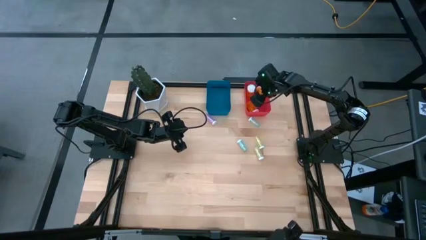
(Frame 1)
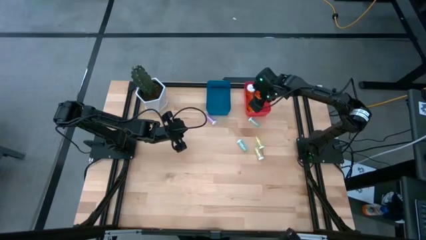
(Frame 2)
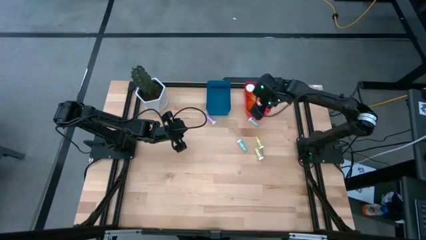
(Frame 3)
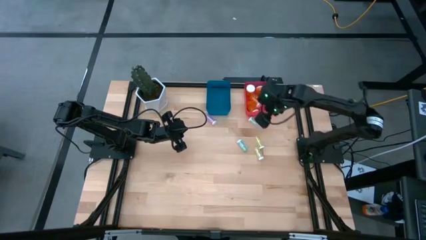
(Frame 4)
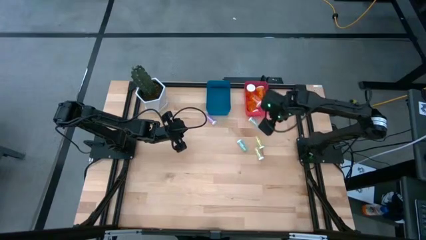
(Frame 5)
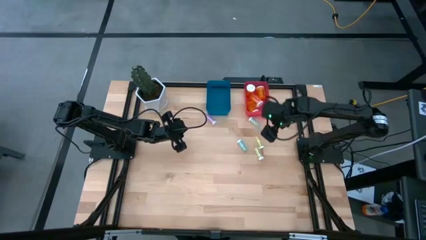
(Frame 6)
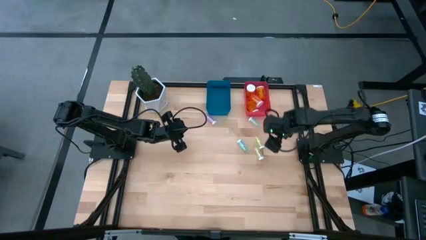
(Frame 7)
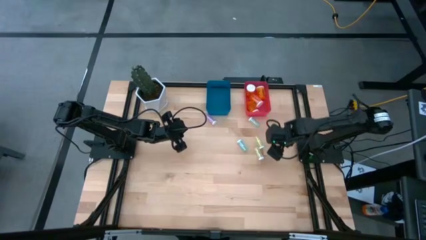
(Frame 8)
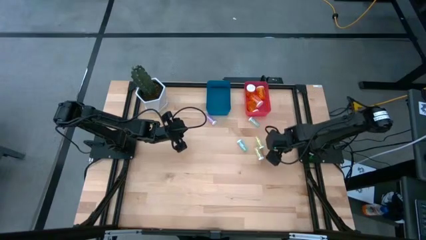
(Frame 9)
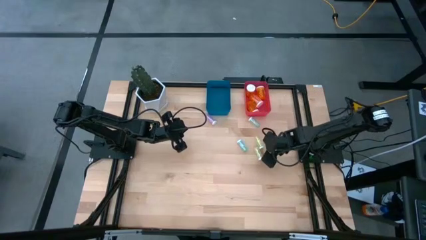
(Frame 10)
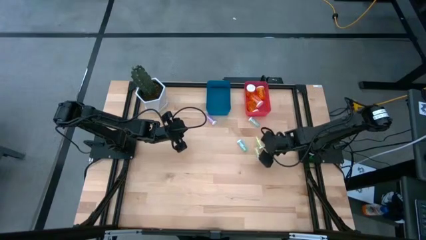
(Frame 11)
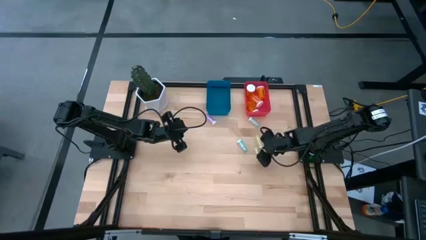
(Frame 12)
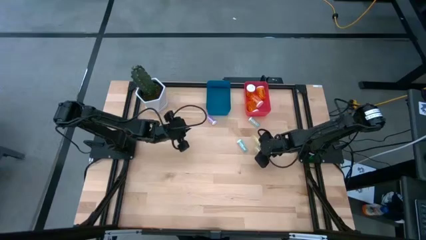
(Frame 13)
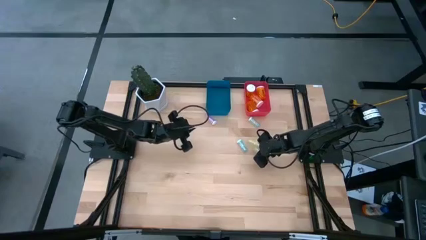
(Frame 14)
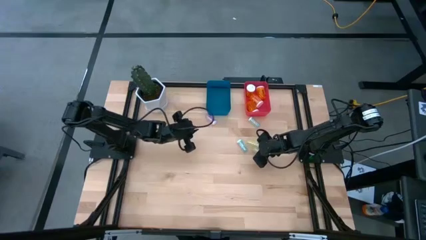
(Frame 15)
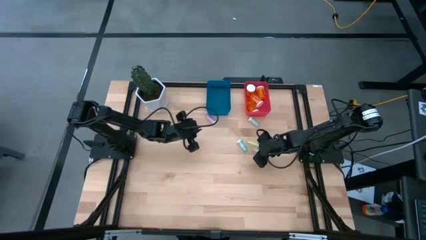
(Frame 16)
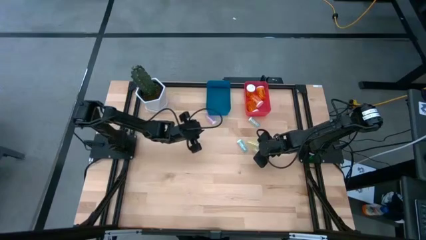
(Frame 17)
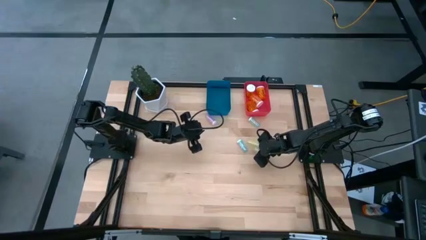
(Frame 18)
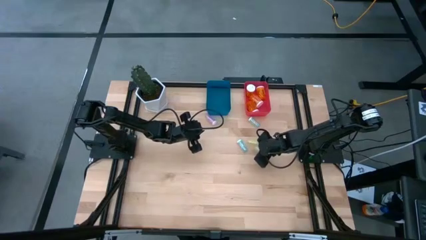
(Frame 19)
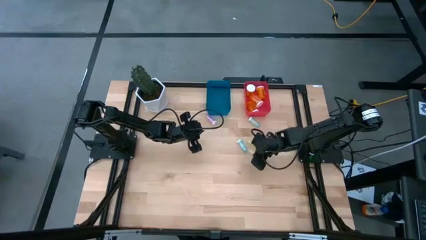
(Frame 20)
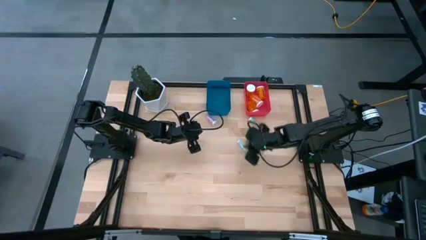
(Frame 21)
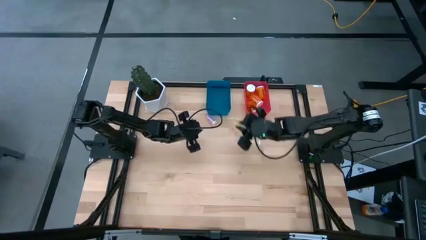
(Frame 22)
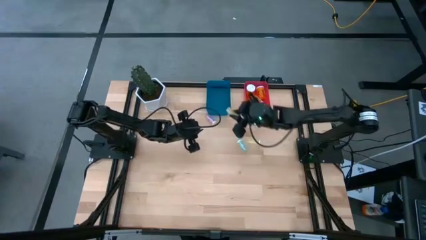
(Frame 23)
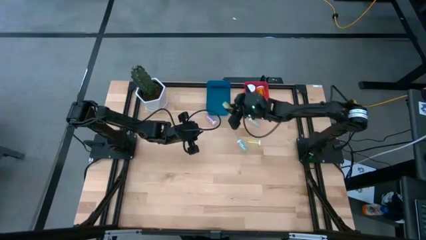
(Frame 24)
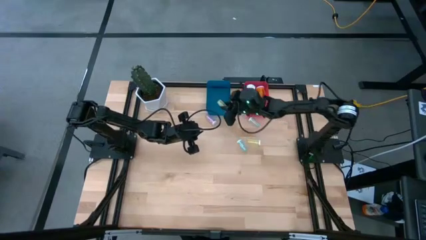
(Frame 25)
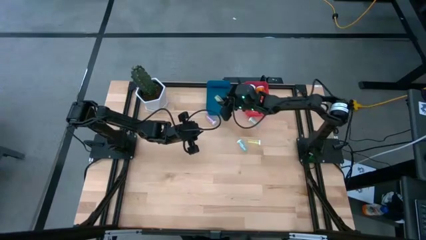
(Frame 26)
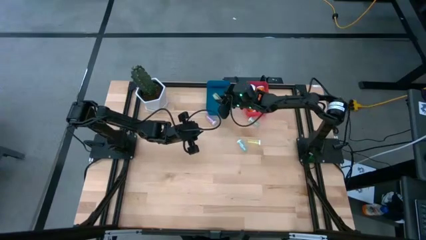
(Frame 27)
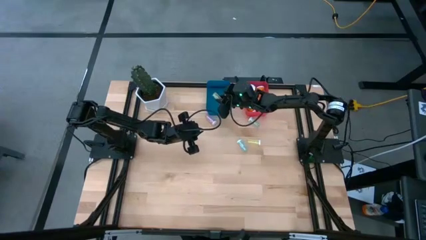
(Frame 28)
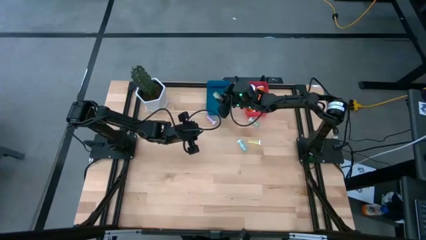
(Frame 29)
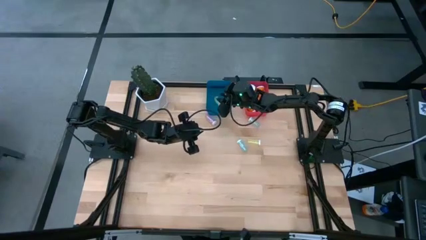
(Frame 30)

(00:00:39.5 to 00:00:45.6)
Task: Pick and place medicine bottles into bin by pill shape (circle, oval)
Put the bottom small yellow pill bottle into the blue bin

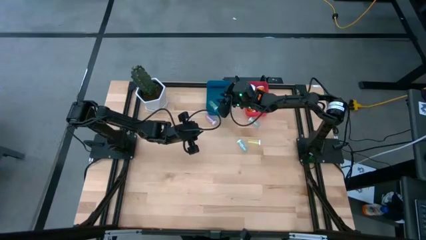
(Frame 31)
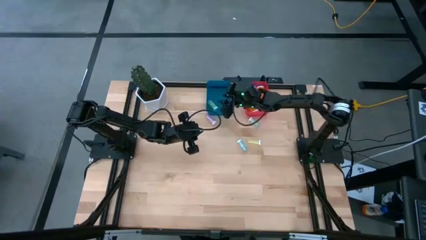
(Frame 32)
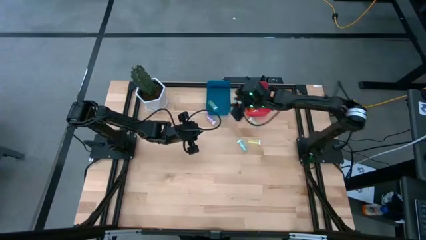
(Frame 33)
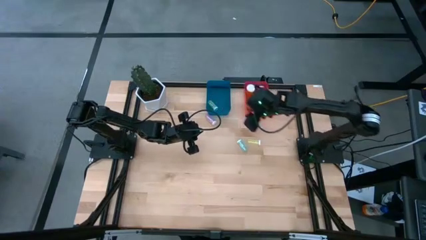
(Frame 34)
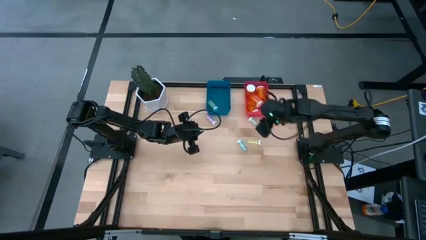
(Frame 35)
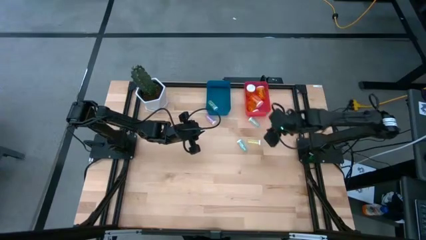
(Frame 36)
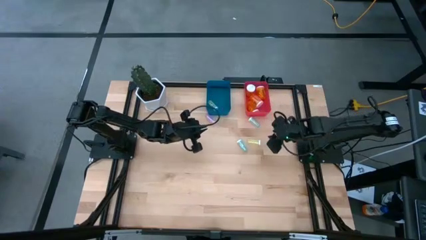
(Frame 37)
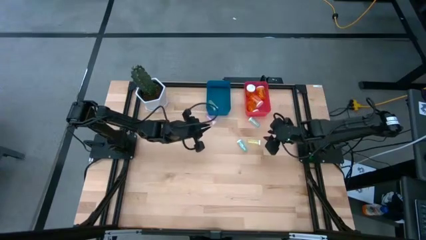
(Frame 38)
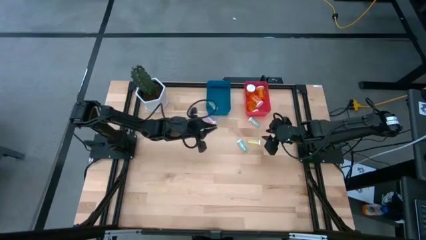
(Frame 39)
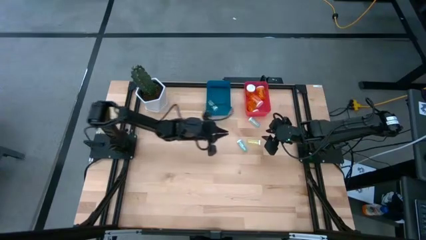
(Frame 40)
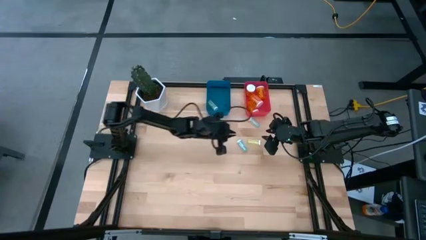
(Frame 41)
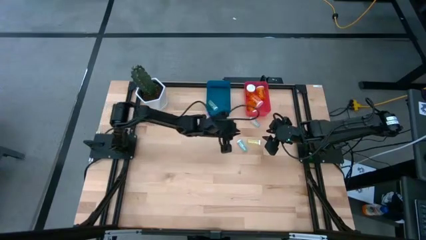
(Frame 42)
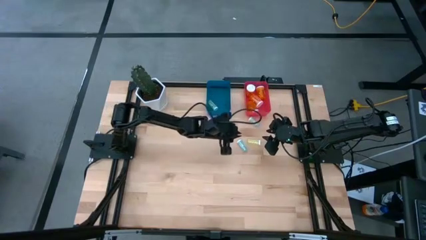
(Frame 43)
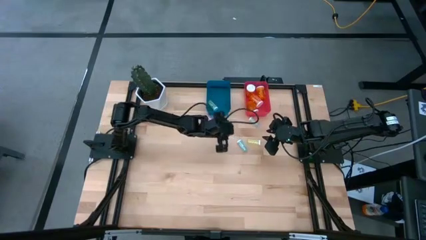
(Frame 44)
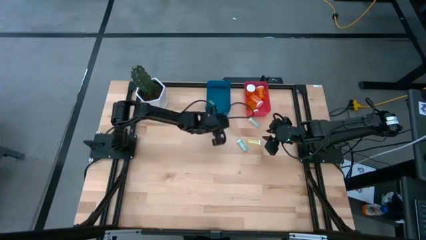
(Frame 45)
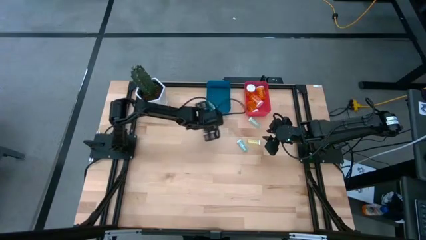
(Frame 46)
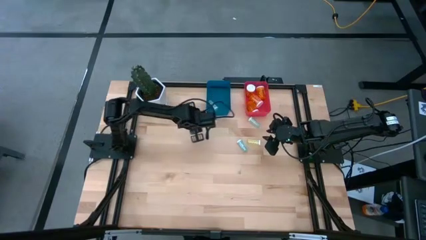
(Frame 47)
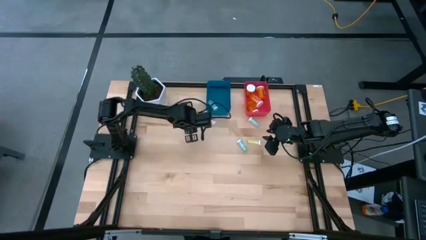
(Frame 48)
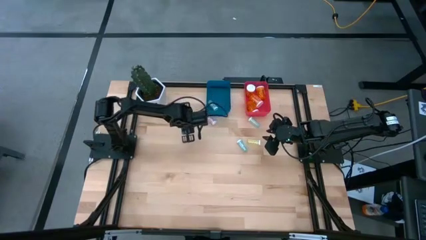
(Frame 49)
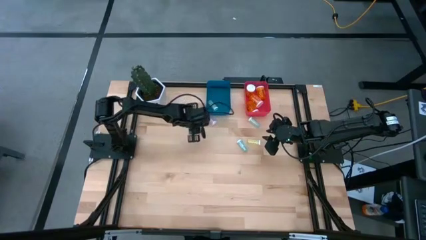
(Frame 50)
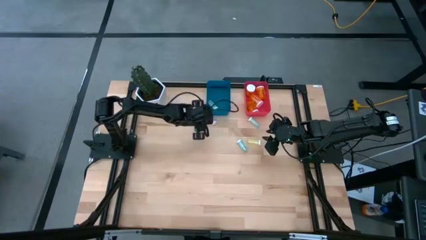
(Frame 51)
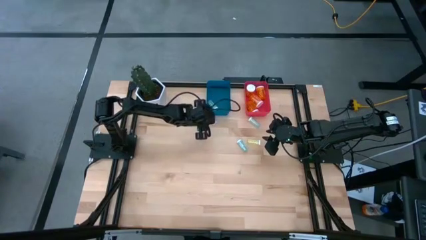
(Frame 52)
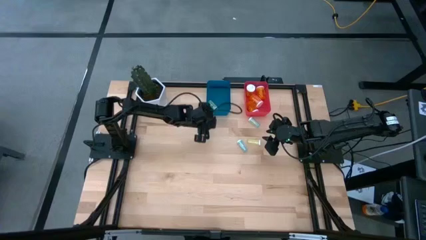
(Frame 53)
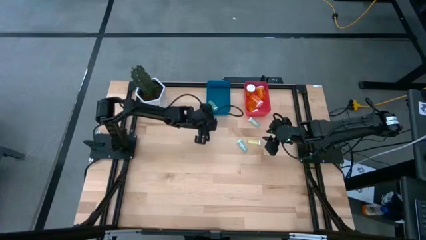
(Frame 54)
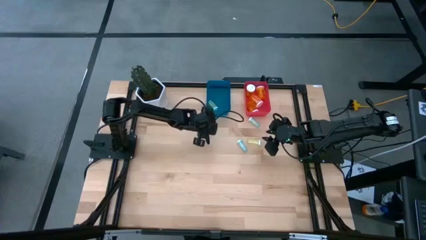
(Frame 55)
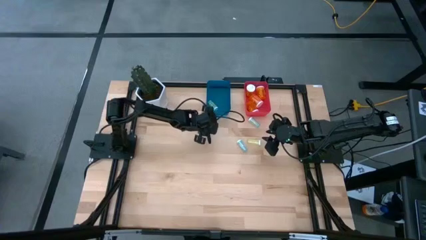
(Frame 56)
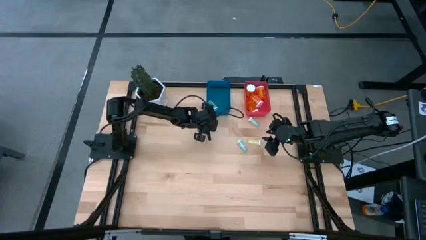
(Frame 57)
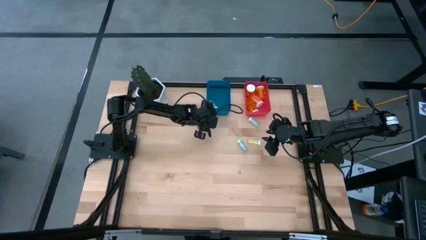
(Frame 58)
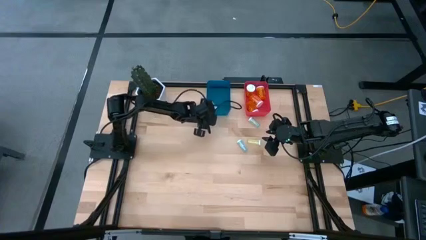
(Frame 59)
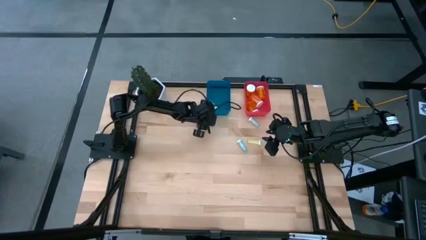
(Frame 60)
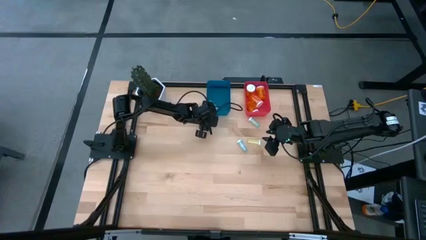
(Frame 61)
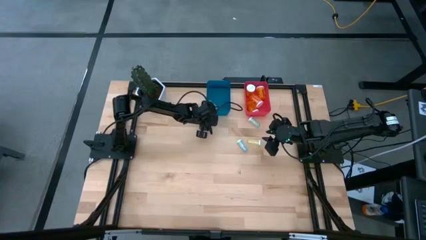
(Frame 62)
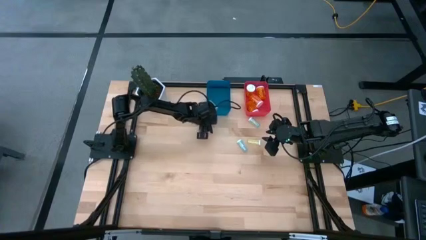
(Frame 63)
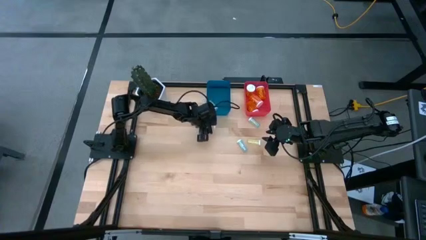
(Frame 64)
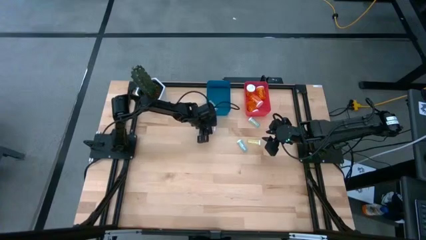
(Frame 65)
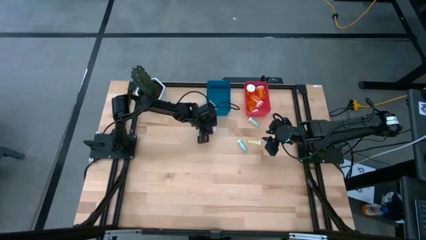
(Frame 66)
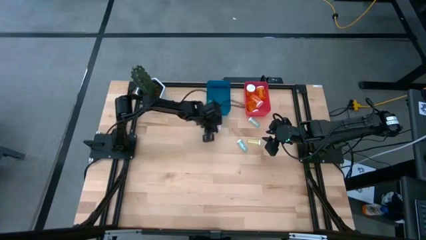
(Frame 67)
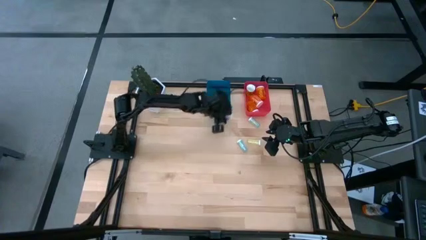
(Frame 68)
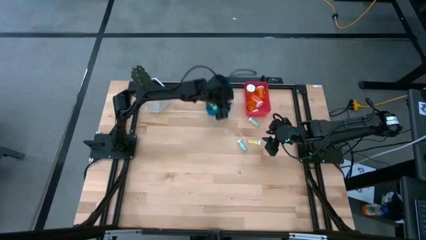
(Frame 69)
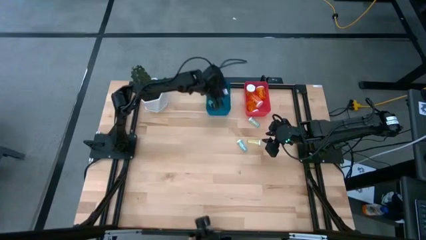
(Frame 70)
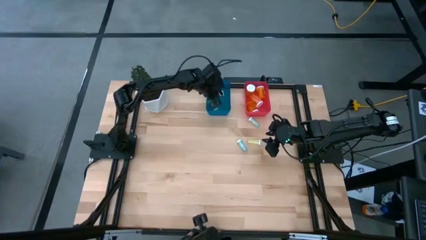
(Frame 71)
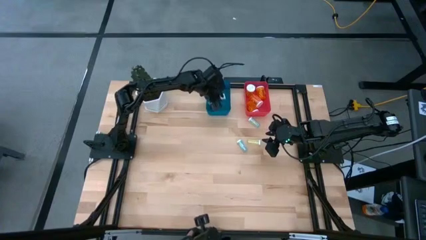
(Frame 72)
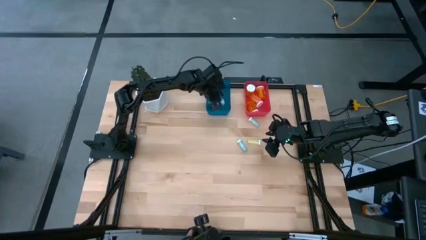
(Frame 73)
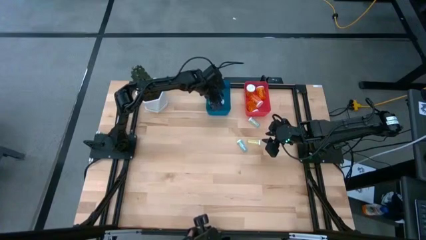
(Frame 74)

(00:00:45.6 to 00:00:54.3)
Put the small purple pill bottle into the blue bin
